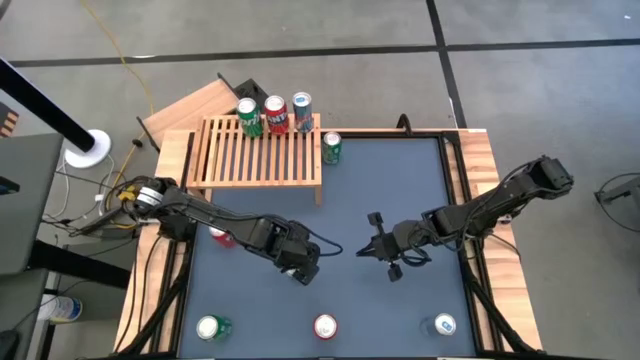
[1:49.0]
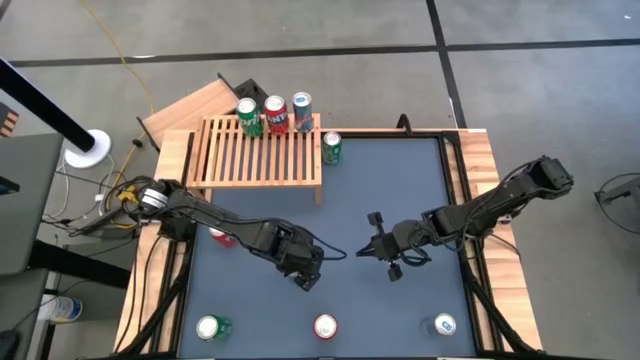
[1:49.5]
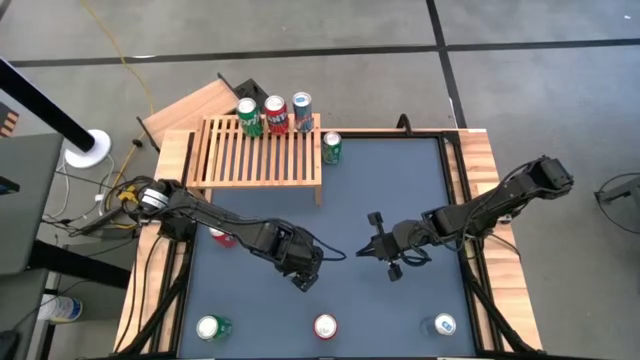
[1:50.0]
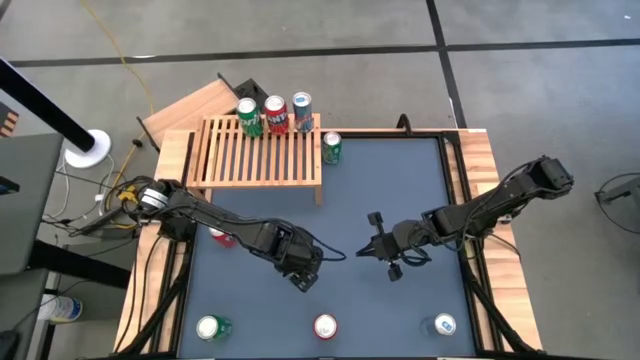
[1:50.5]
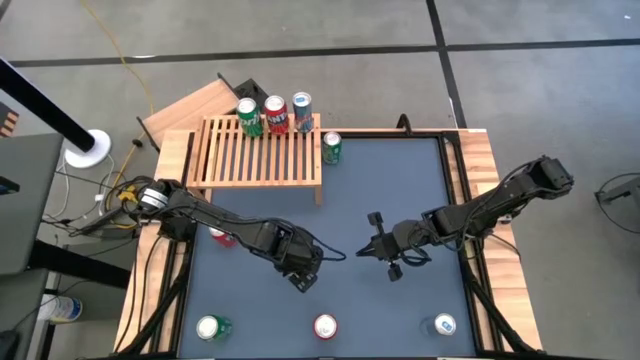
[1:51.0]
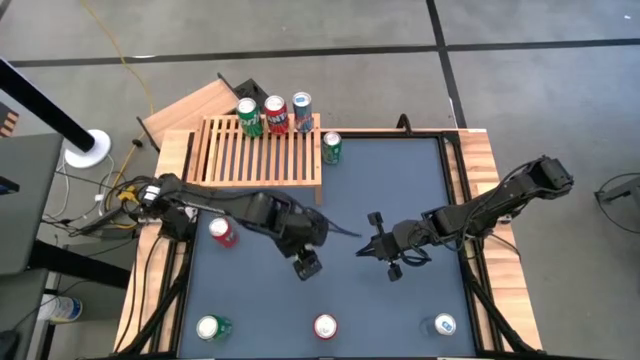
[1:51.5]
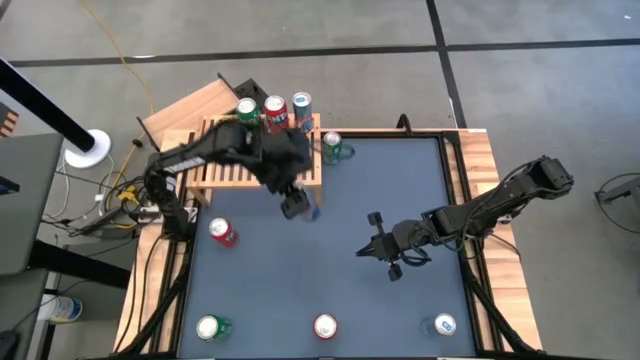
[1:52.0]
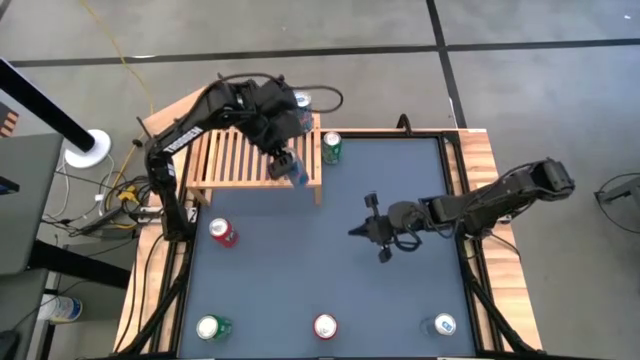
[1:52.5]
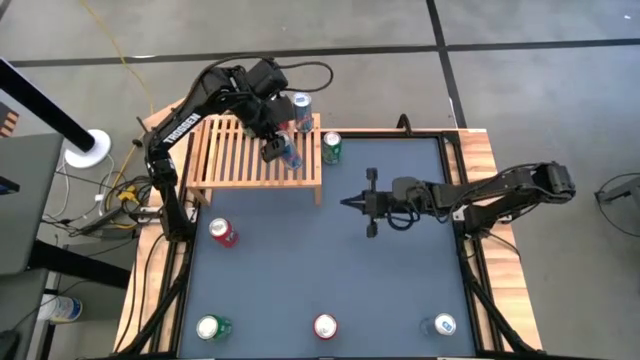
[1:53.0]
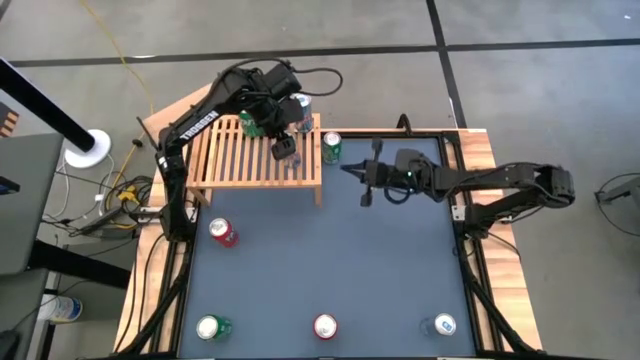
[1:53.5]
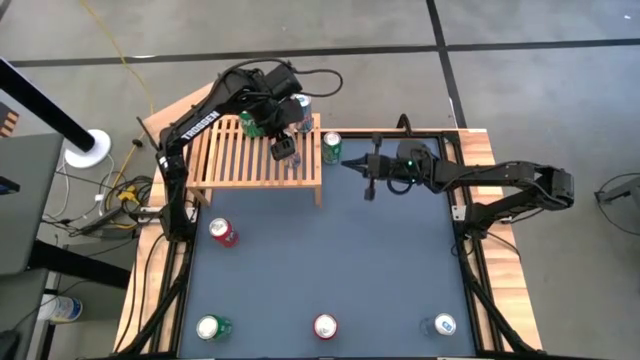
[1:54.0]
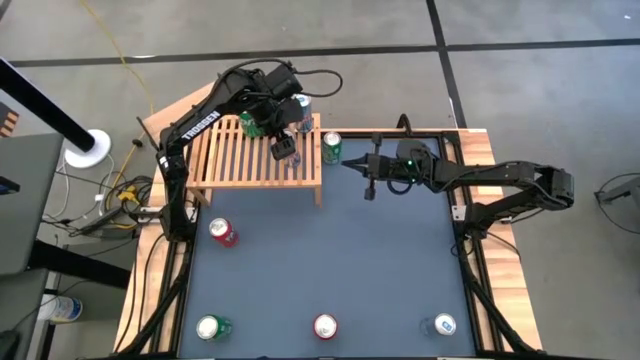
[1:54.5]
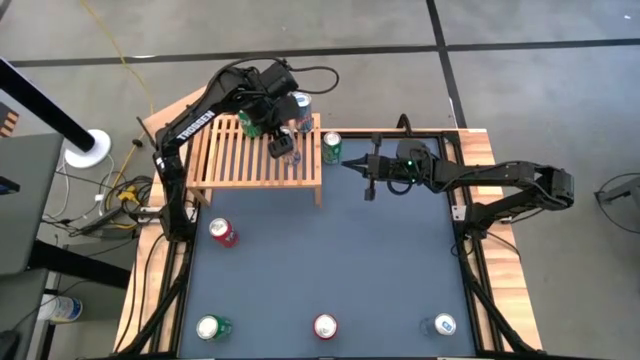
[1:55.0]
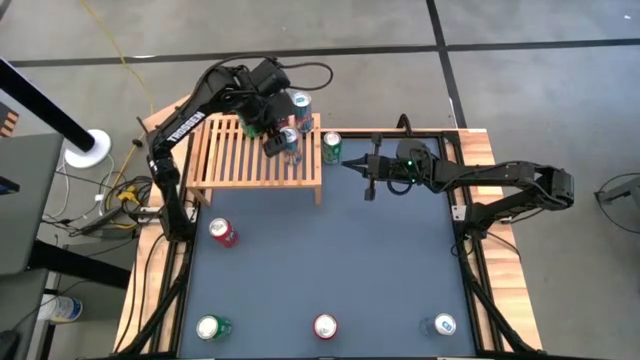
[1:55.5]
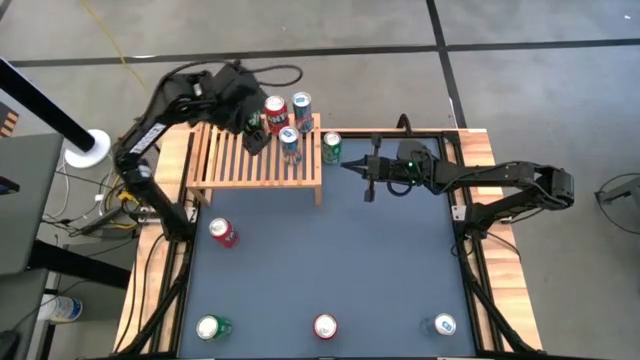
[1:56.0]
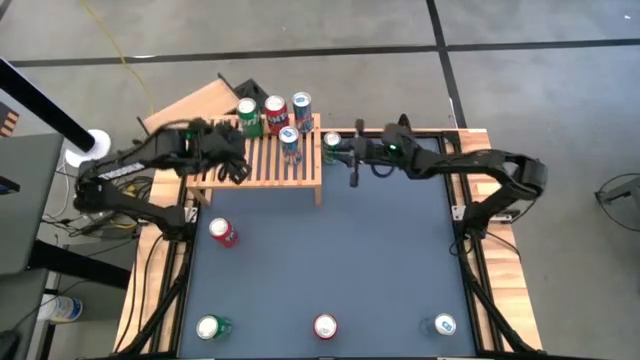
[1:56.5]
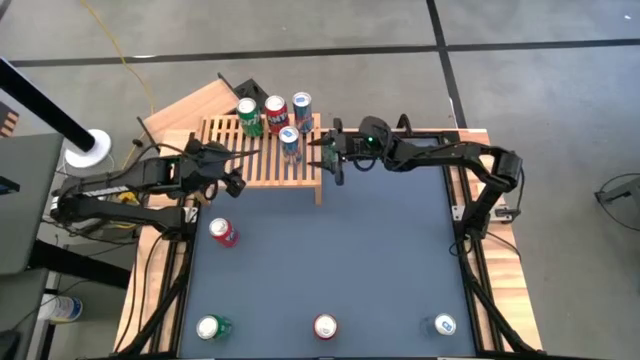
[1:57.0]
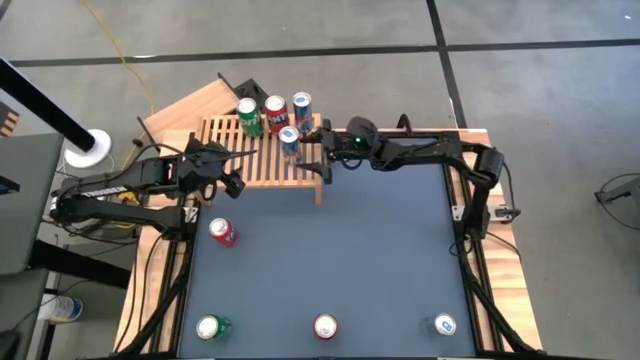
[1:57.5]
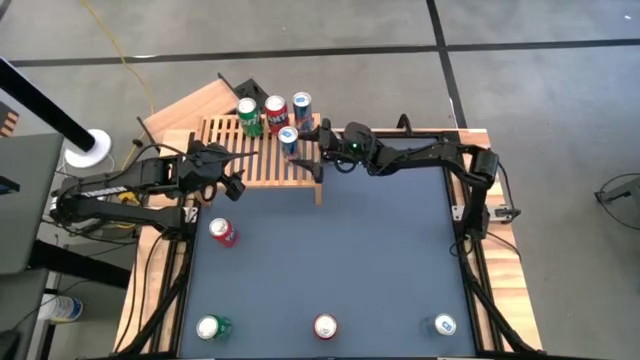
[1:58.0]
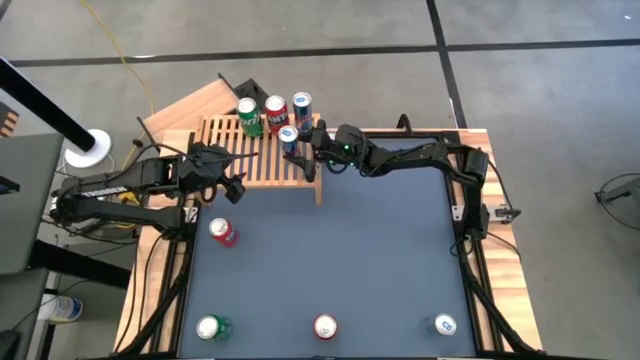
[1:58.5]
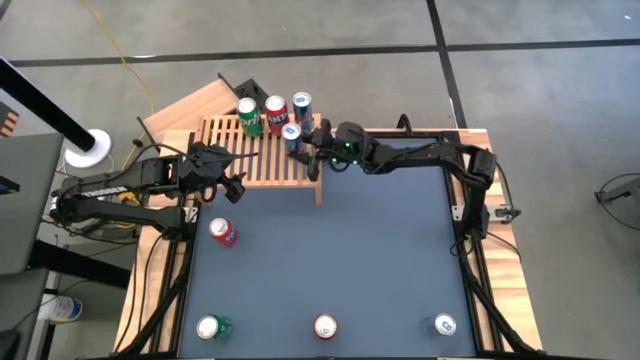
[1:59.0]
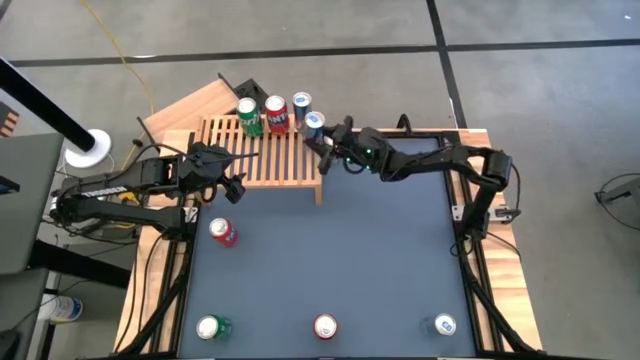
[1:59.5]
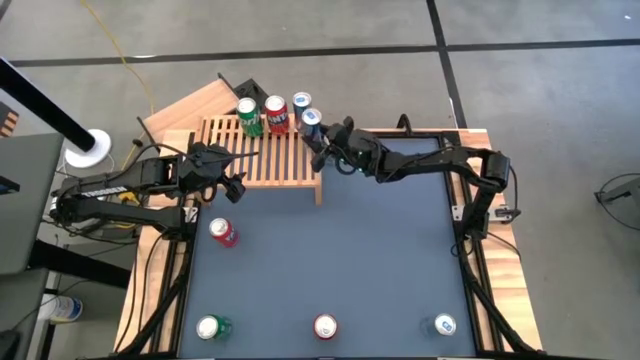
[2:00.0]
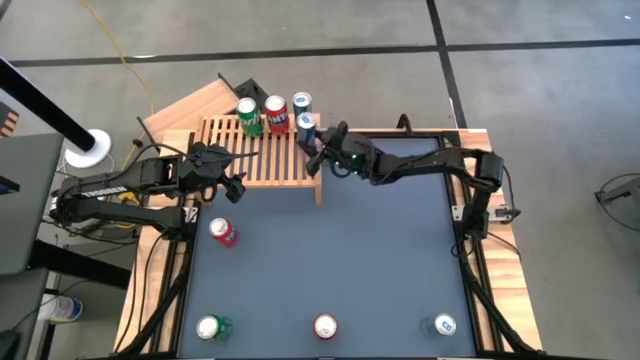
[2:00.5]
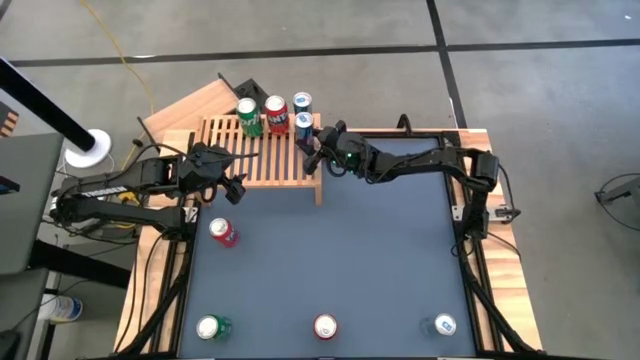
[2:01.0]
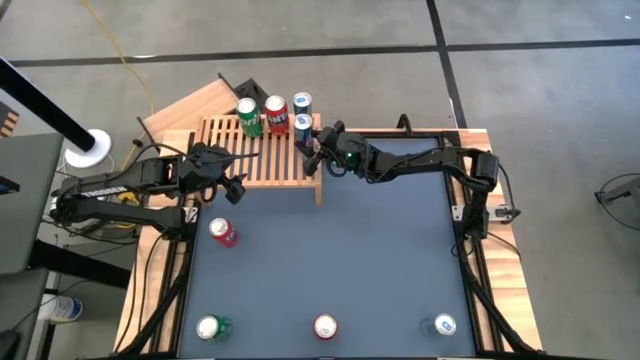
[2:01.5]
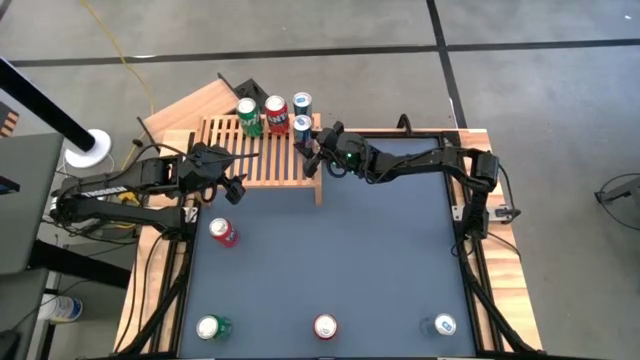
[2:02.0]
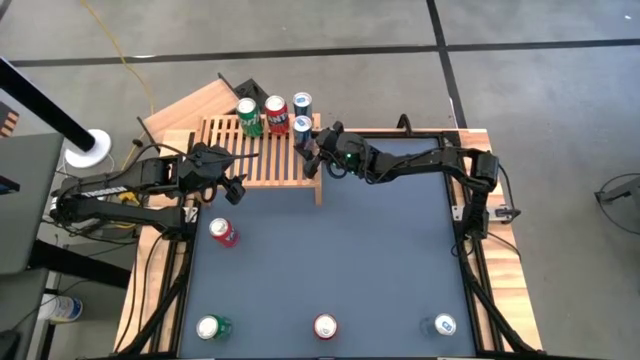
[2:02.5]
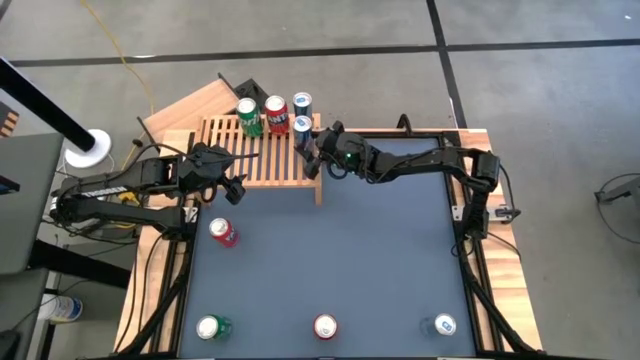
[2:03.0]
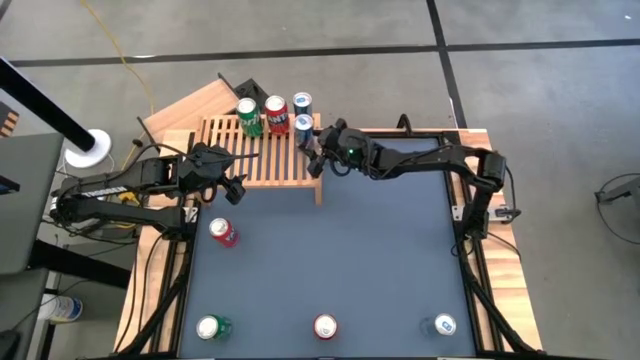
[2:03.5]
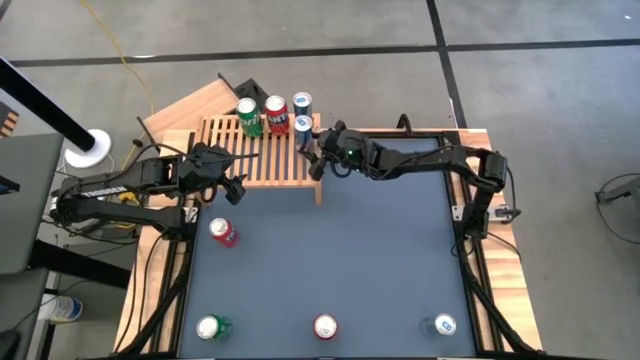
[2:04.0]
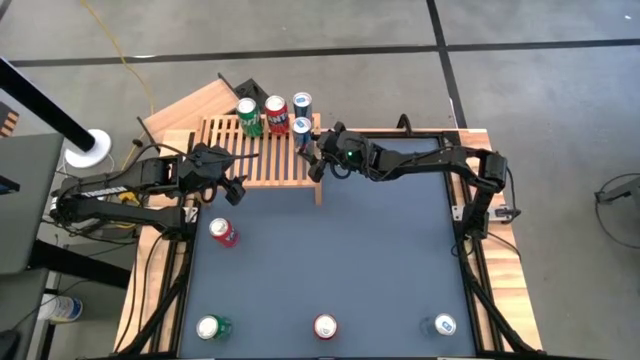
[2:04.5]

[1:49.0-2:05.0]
Task: Place canned beverage on shelf
Put the top blue soda can on the shelf aligned with the other blue soda can

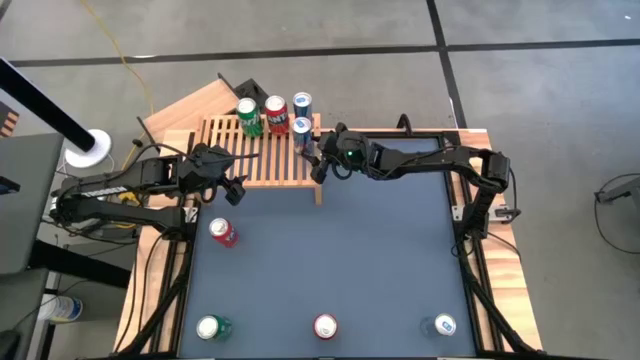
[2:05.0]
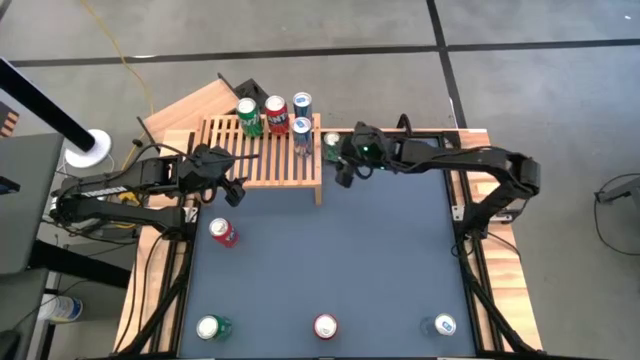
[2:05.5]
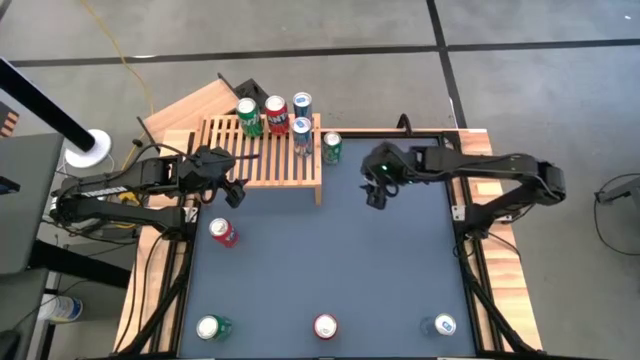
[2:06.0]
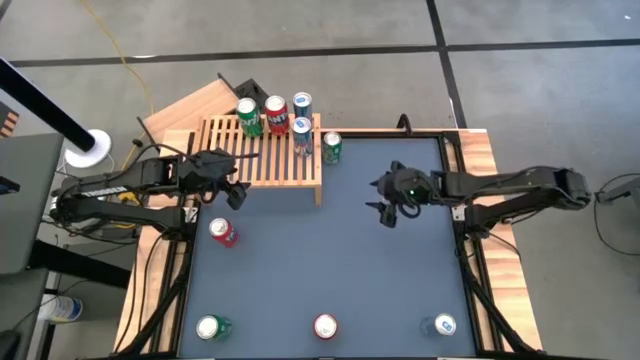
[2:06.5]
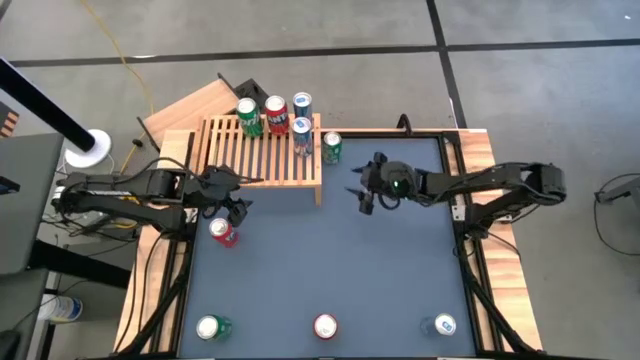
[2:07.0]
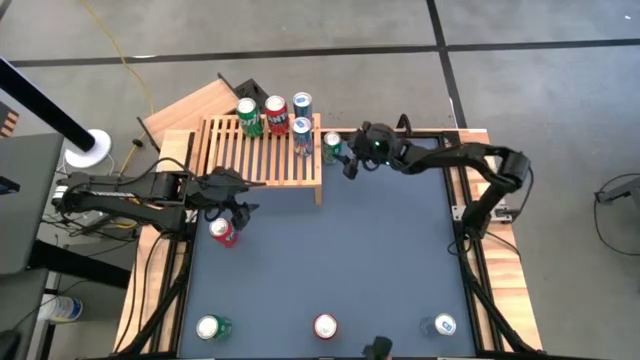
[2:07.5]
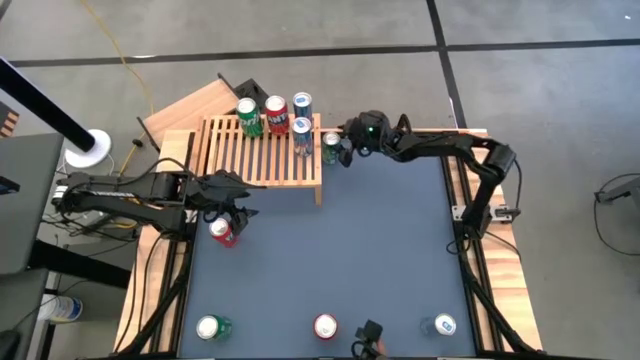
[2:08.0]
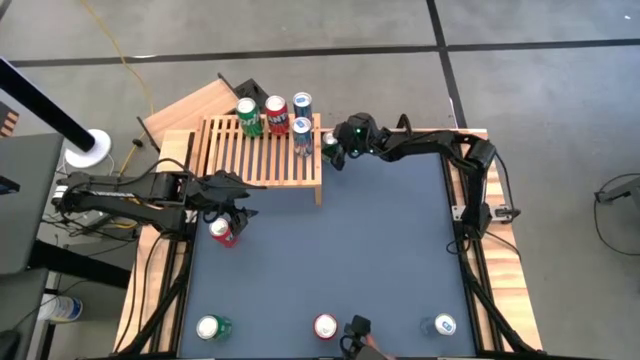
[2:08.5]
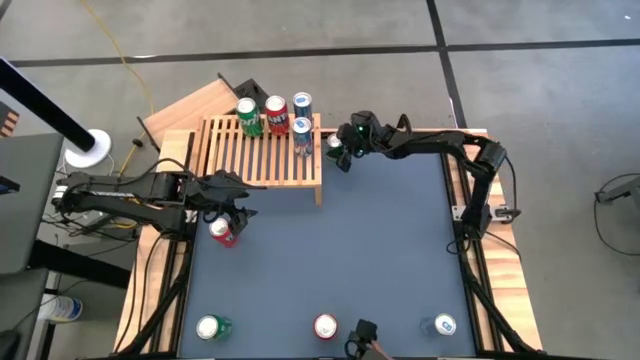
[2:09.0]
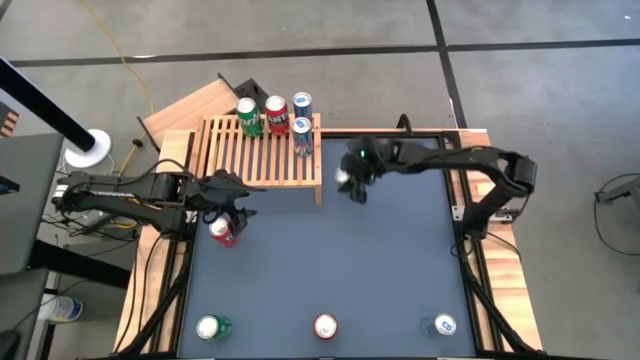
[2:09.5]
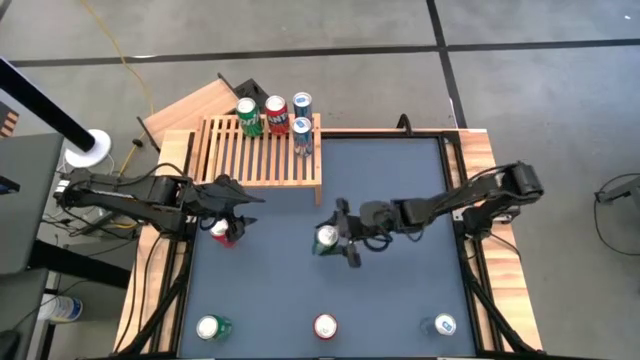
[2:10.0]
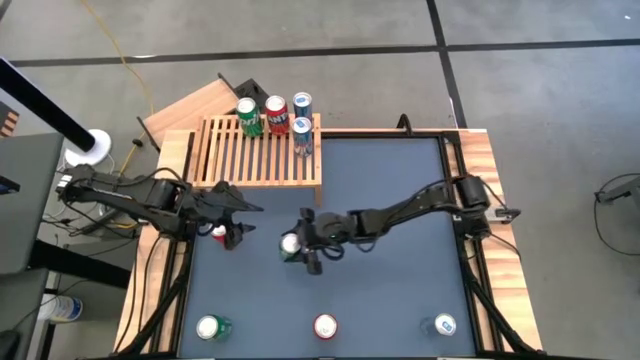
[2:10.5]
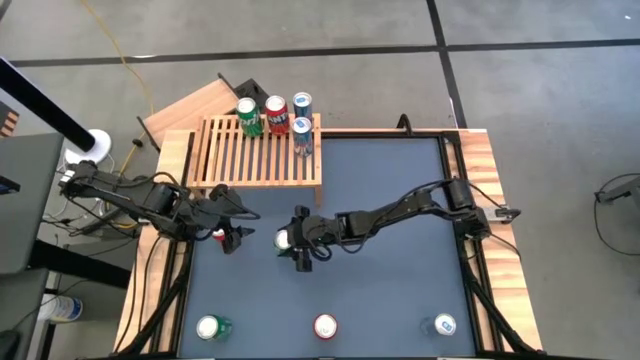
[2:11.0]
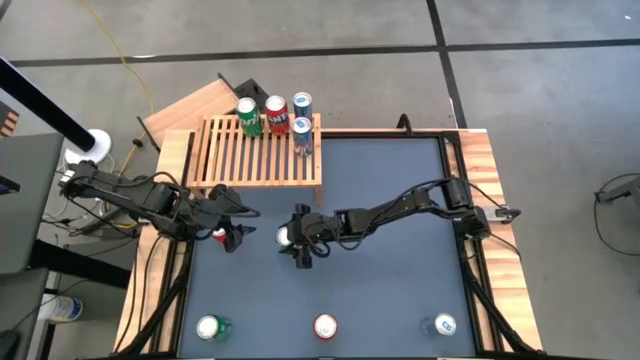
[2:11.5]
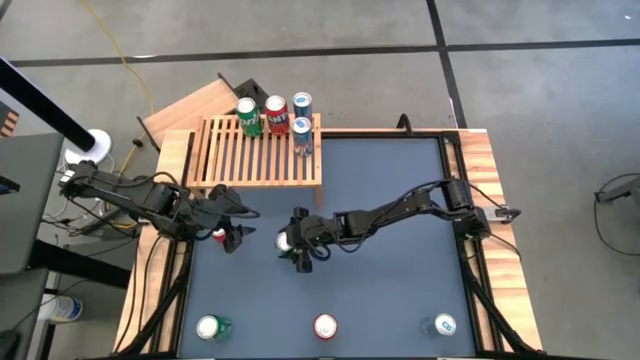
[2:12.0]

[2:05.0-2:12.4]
Move the top green soda can to the center of the table
